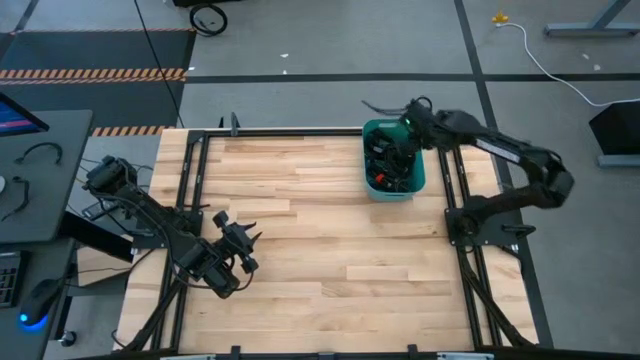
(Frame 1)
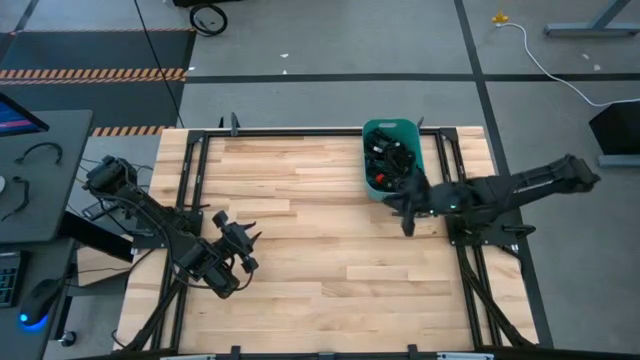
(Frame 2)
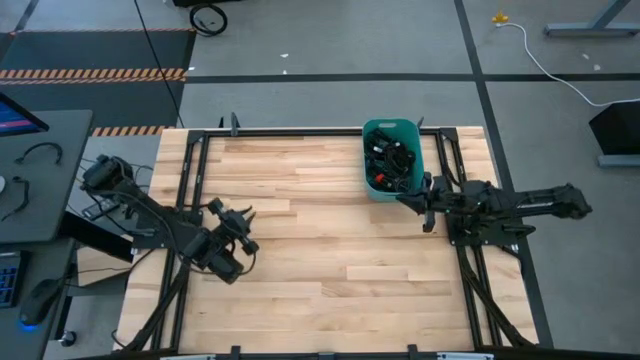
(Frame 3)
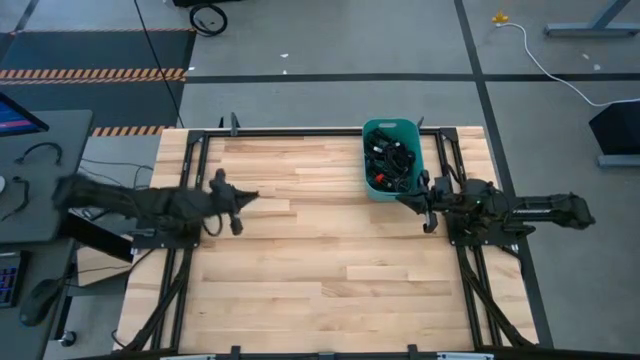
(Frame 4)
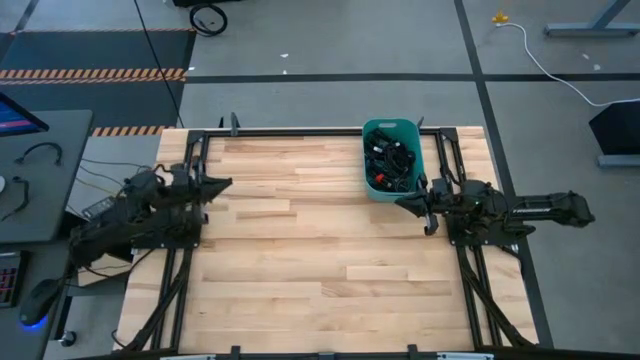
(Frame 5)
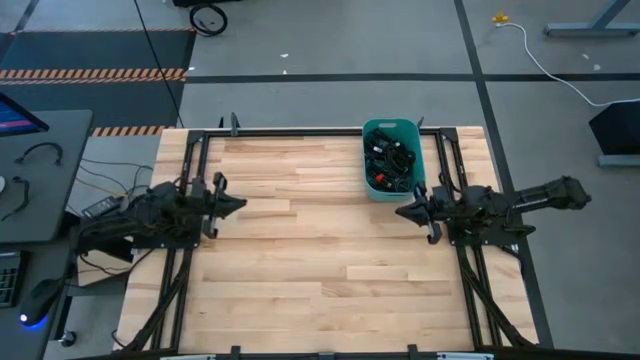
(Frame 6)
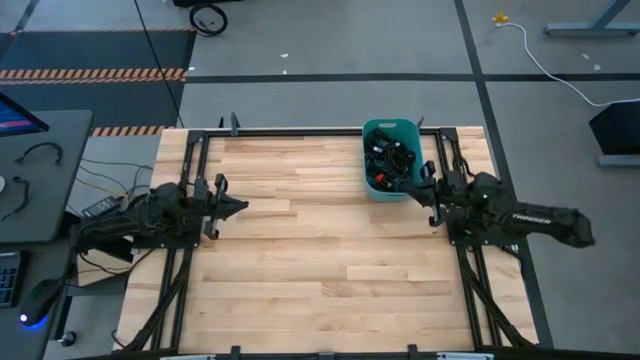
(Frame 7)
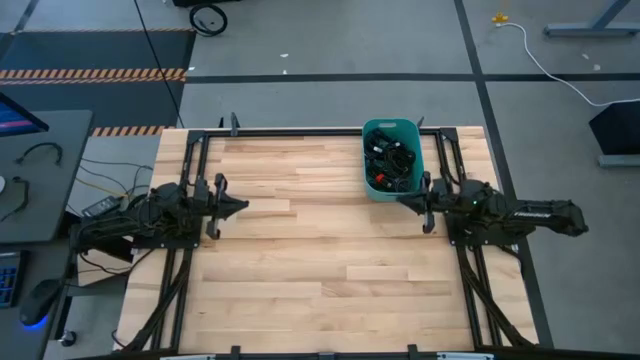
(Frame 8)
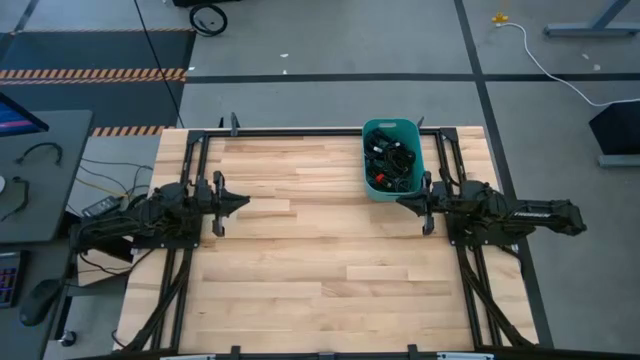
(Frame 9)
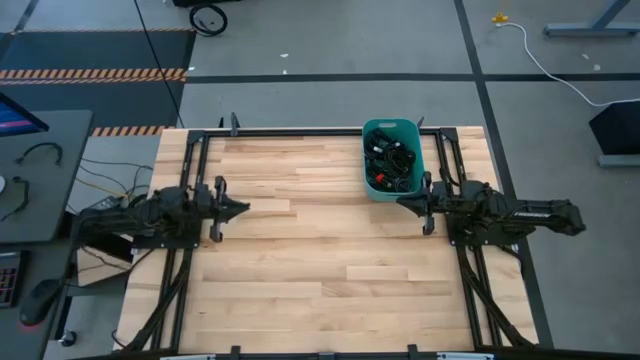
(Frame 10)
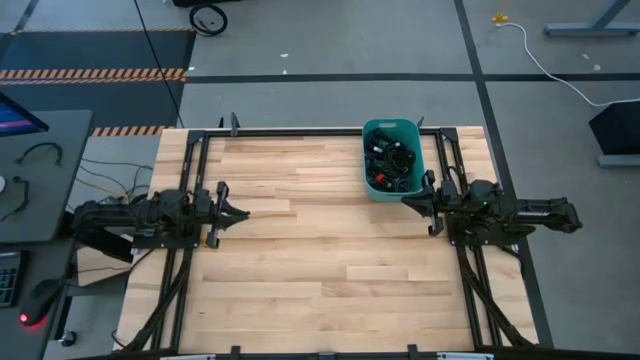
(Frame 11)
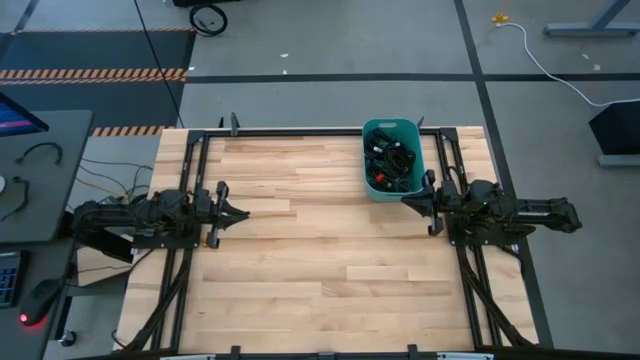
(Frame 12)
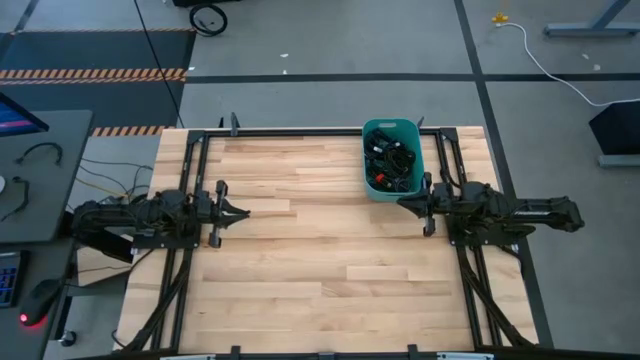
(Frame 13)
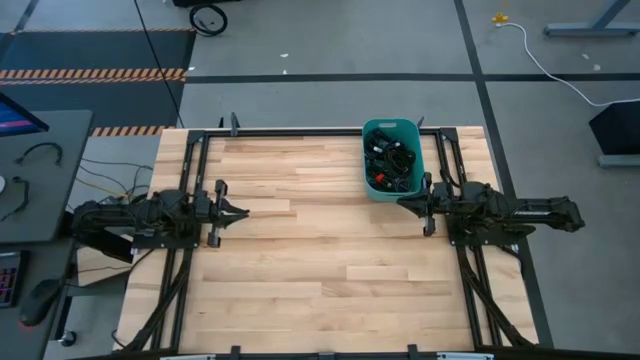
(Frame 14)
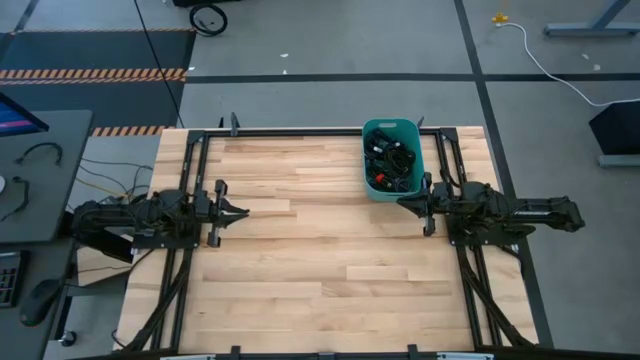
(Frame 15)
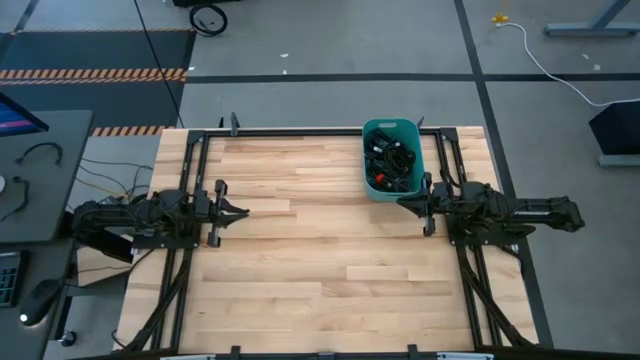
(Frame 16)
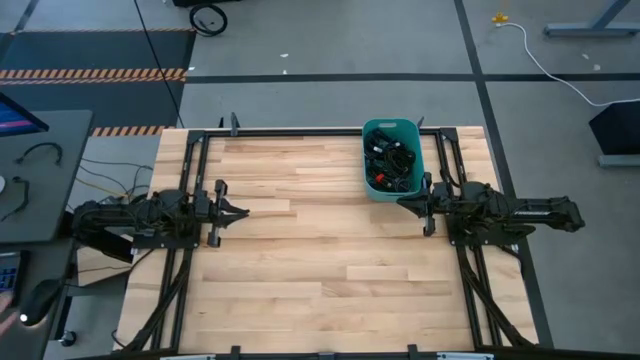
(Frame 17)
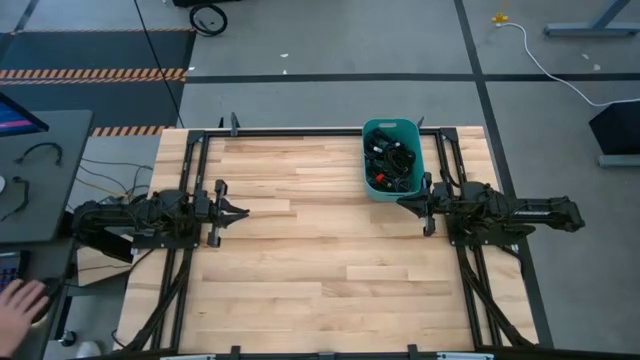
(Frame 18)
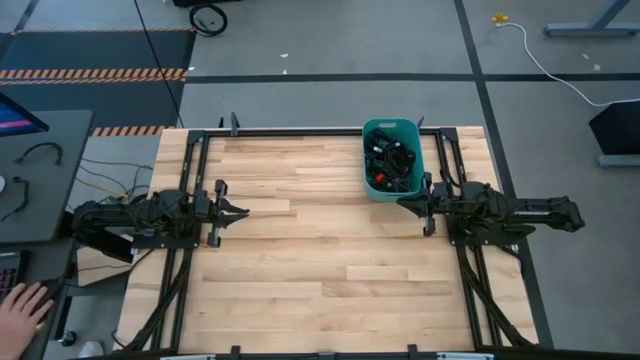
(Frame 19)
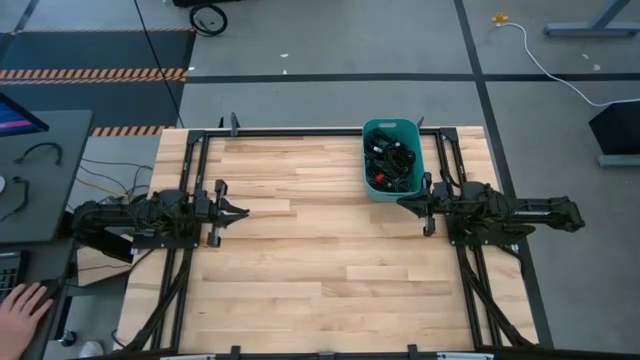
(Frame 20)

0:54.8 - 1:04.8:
Task: Pick and place USB-C Cables
Return to Home Position

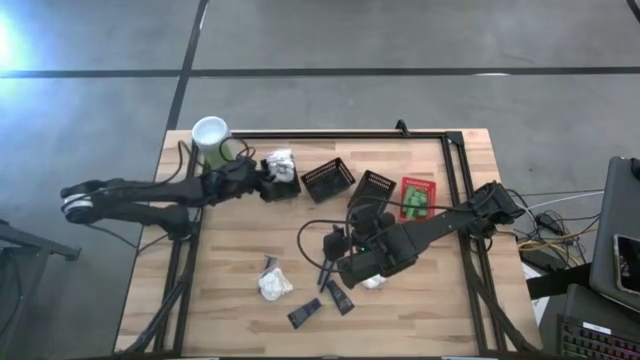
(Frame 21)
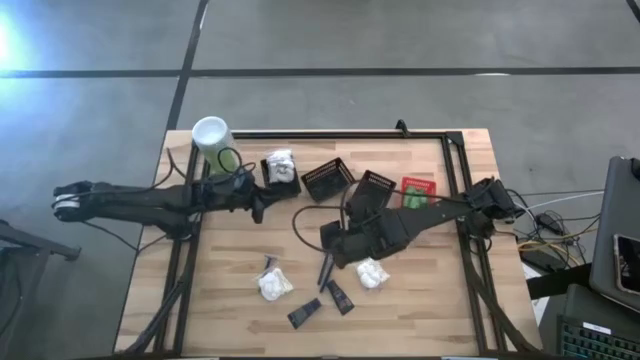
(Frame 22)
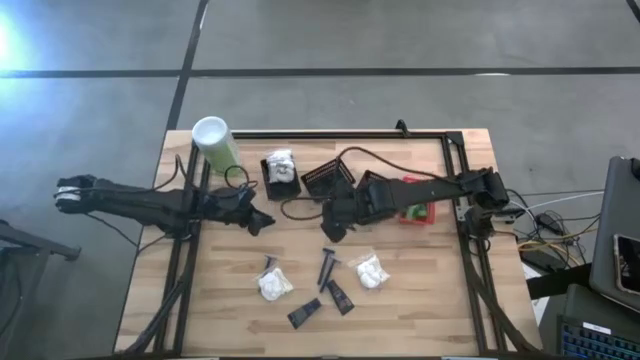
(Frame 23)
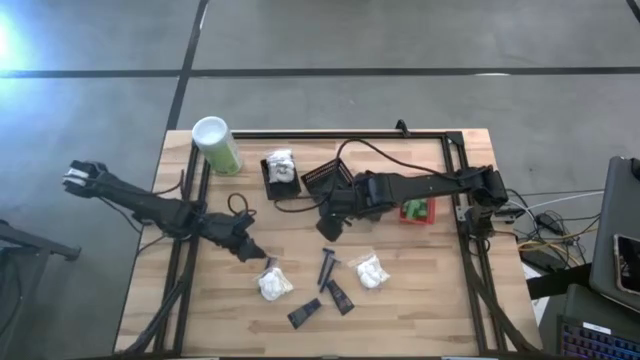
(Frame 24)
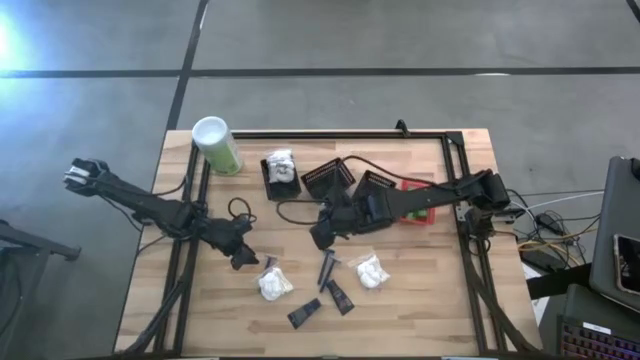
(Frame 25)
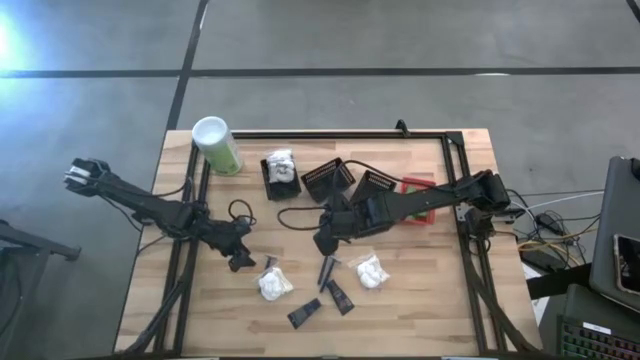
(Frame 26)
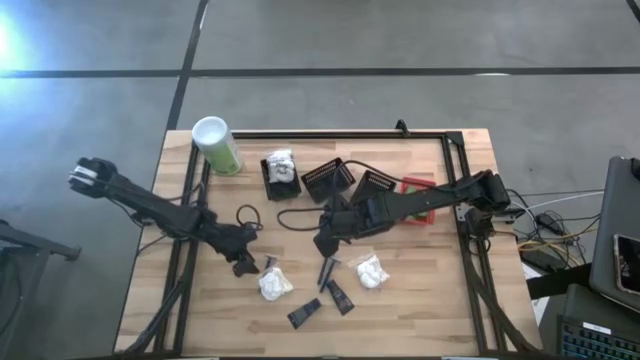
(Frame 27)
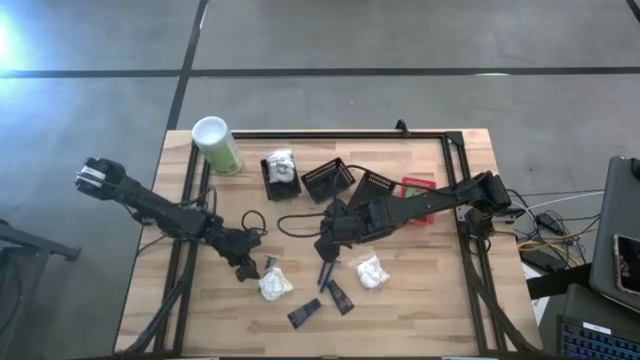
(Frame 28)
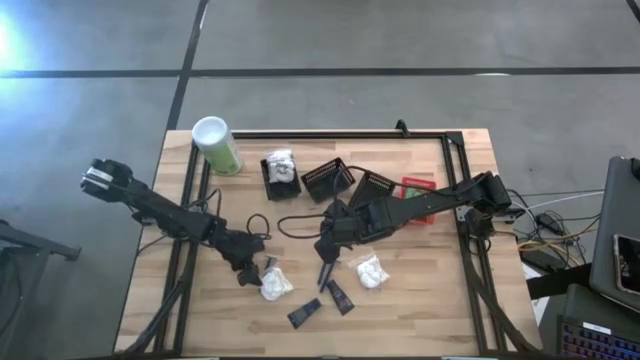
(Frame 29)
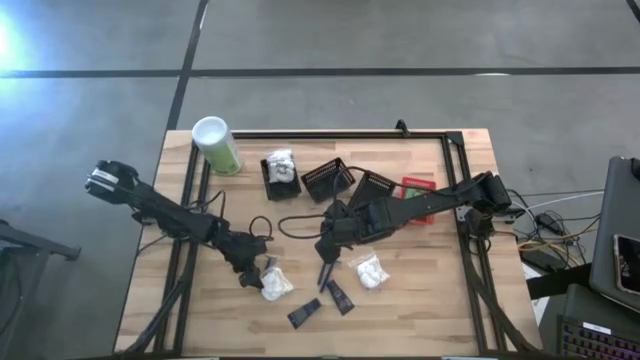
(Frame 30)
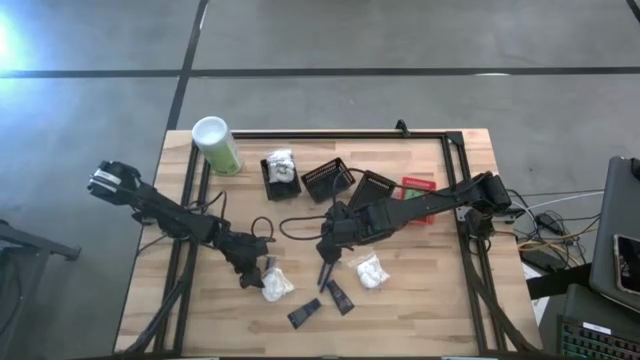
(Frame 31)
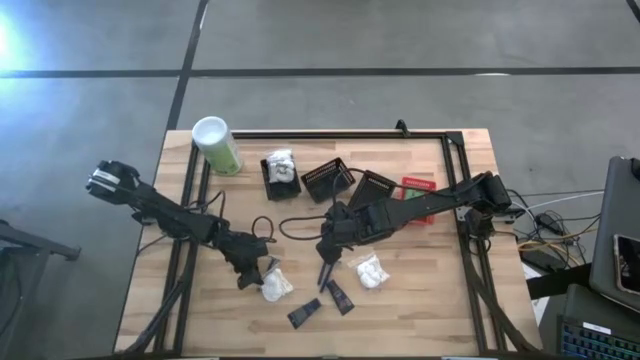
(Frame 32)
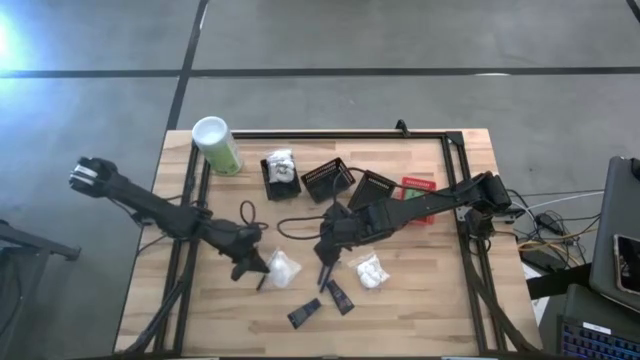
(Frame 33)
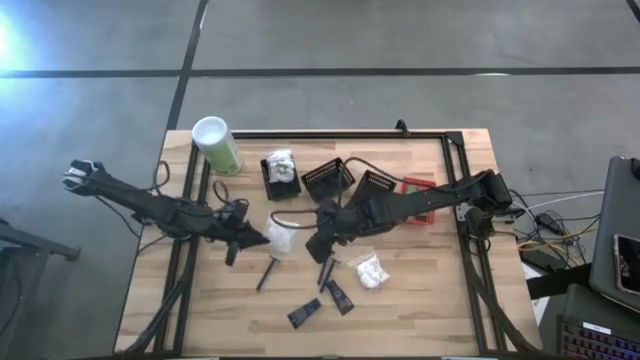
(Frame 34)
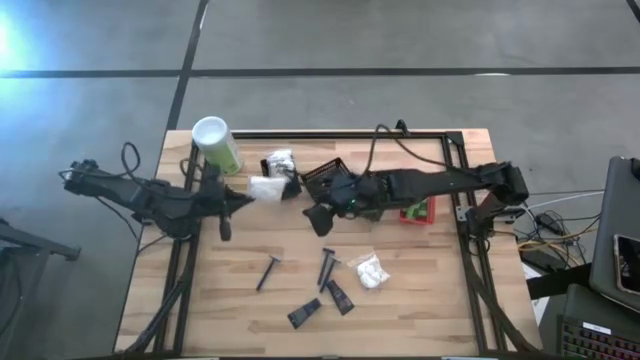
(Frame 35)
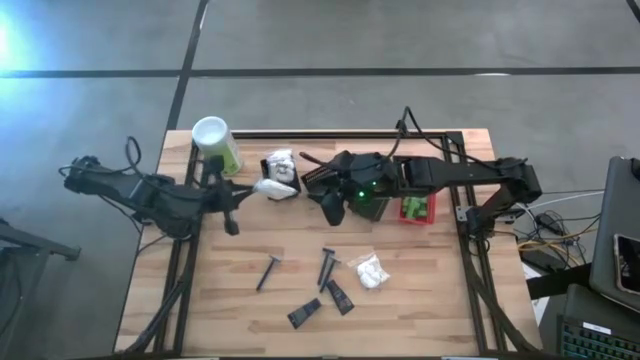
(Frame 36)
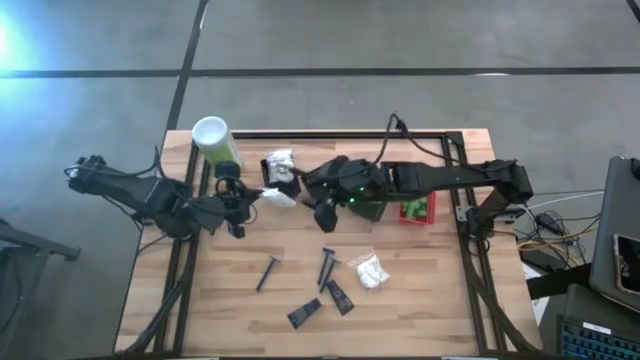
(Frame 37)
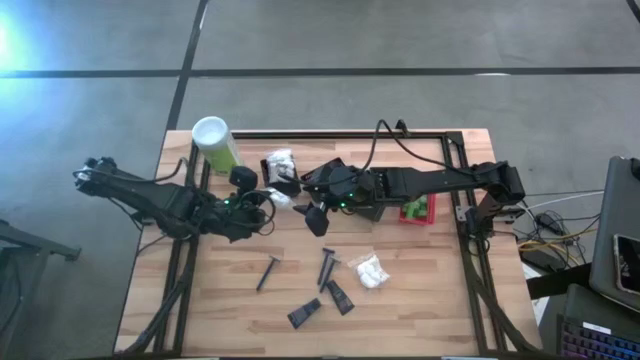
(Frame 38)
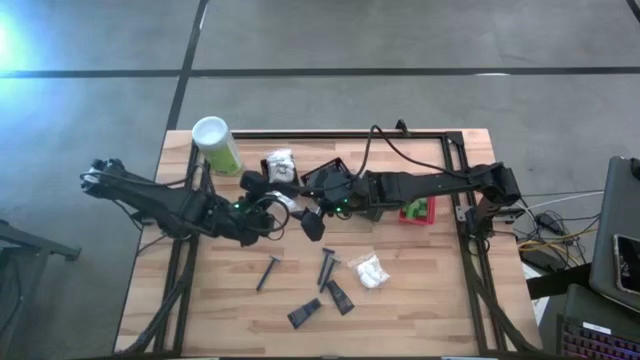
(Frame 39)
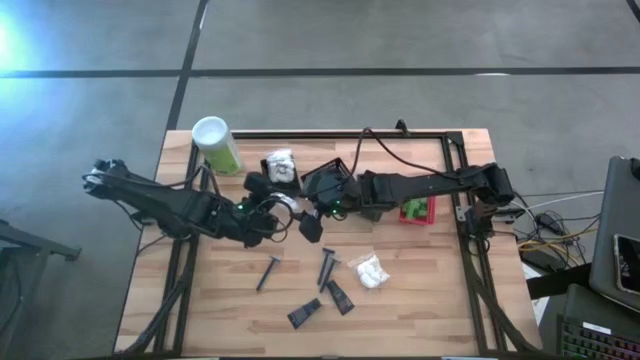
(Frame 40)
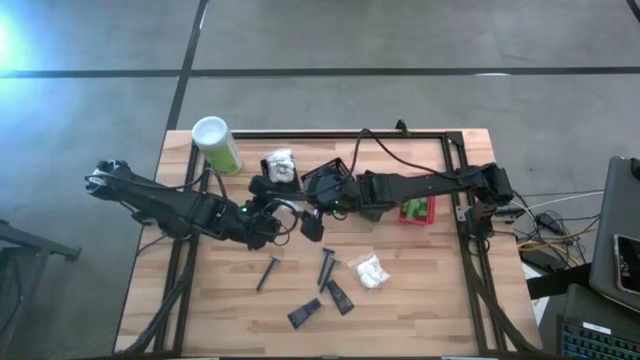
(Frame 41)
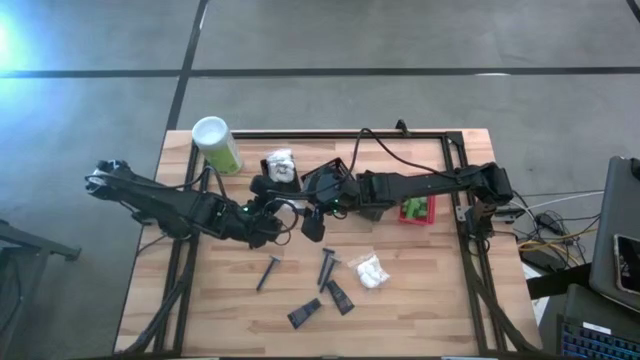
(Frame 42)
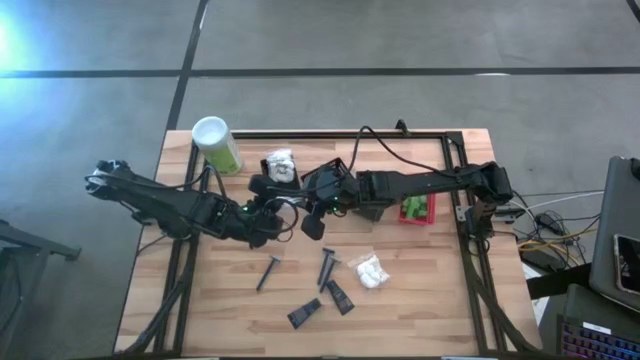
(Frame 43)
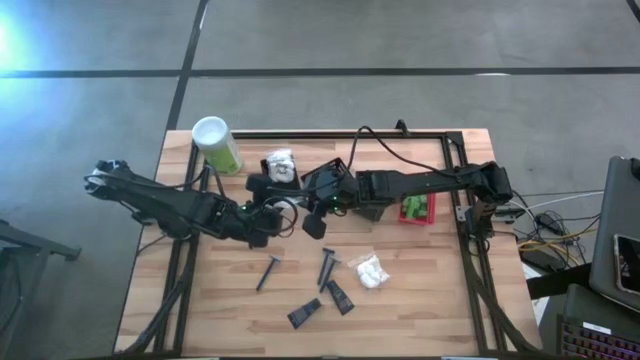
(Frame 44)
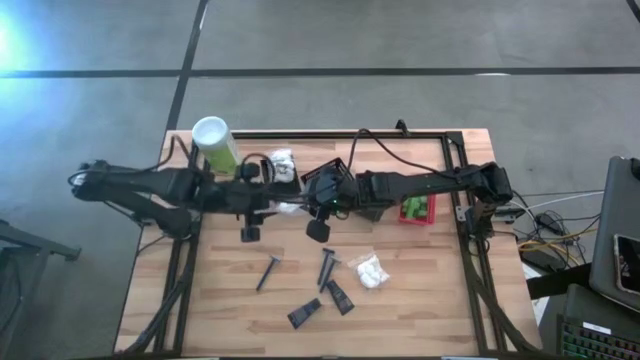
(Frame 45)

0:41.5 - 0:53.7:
Task: Pick & Place Travel size toiletries
Put the cotton pack into the left black bin
